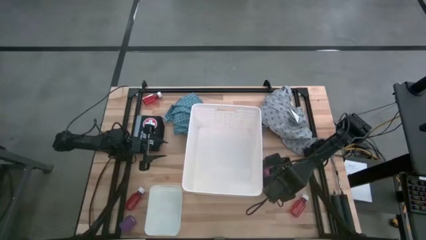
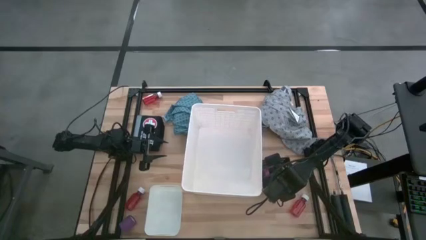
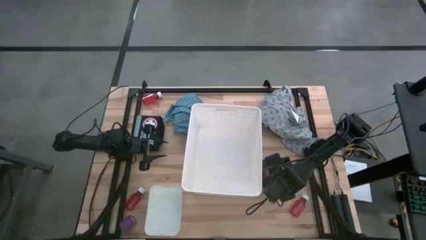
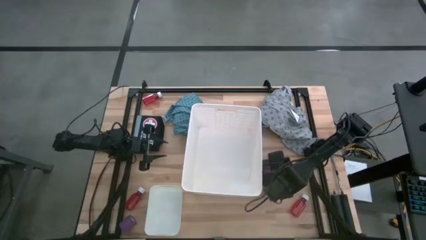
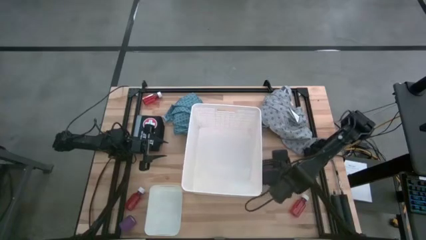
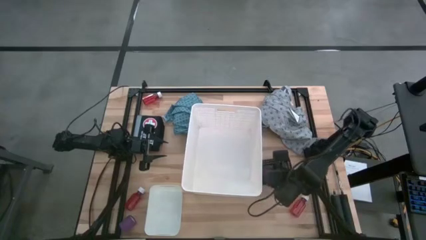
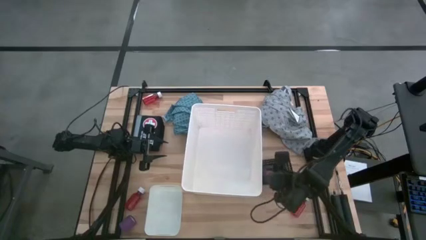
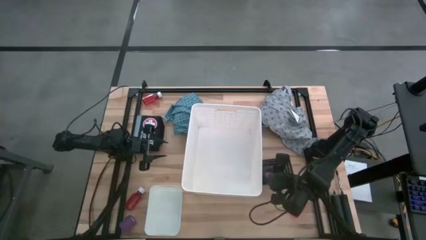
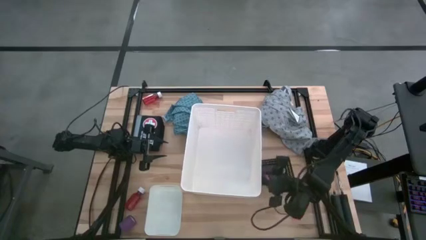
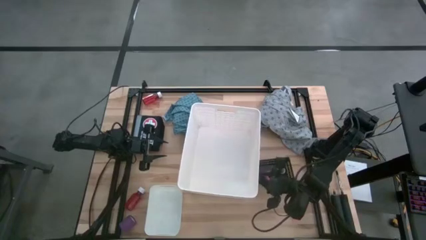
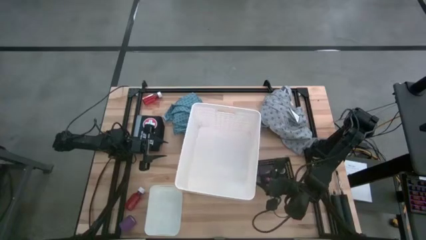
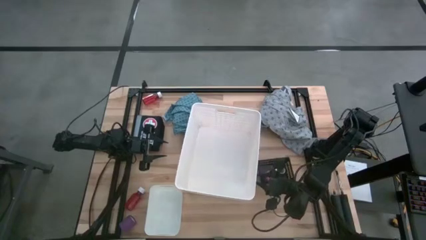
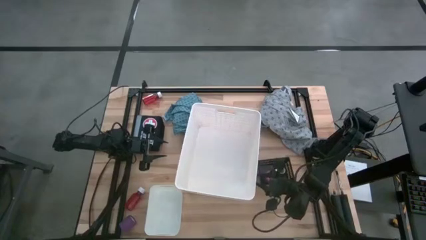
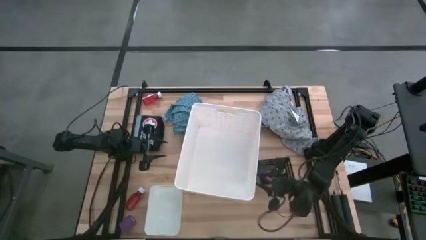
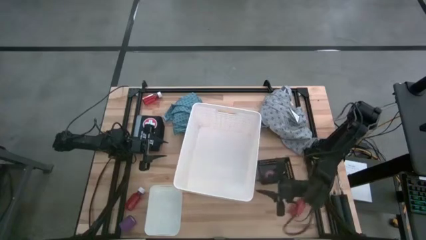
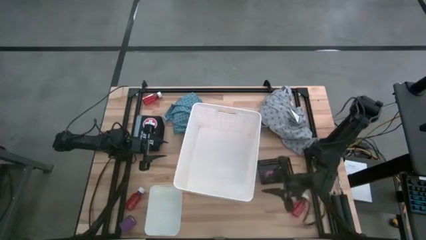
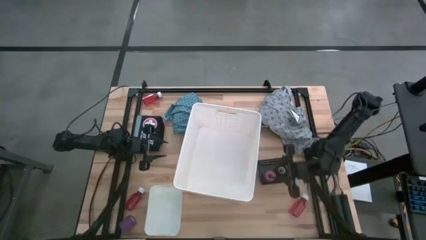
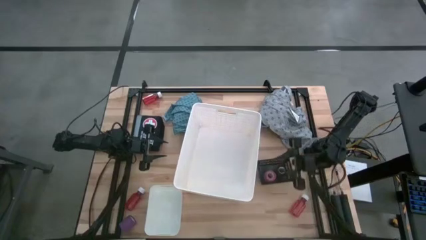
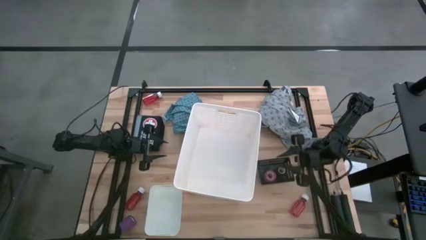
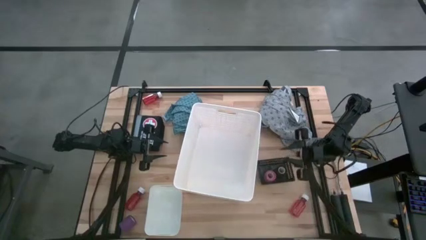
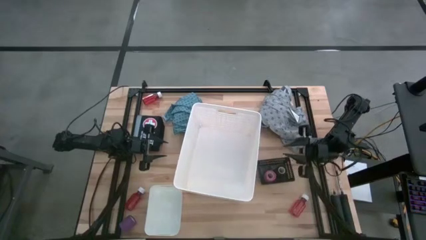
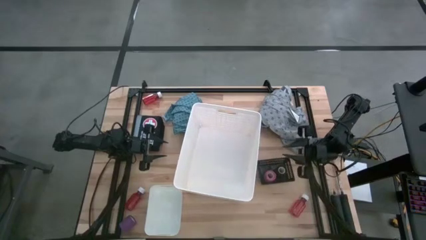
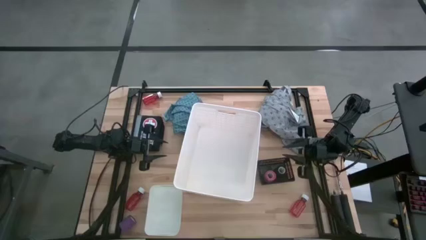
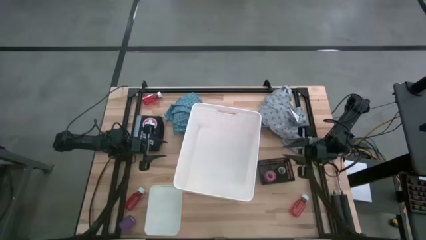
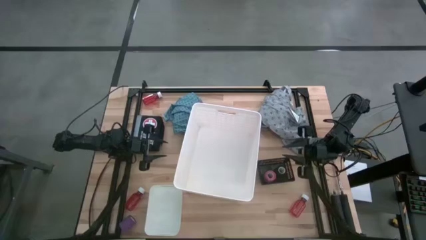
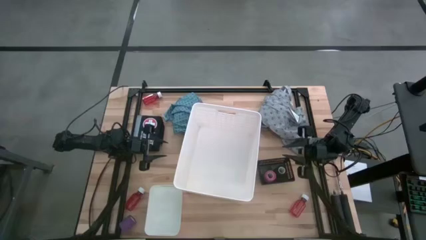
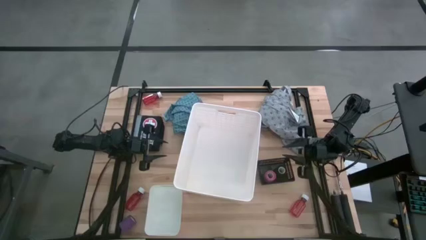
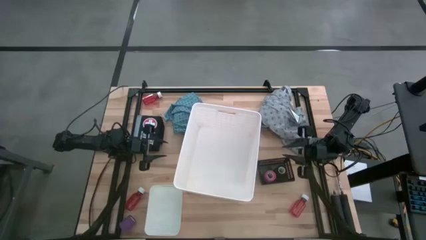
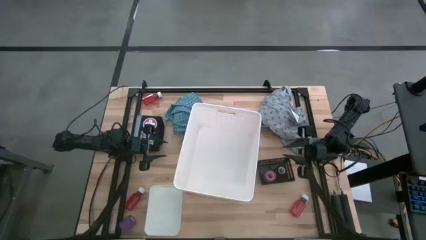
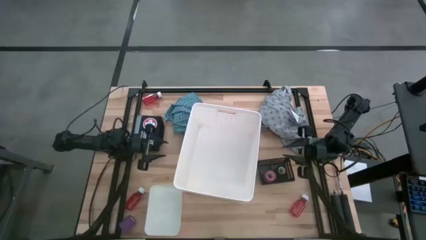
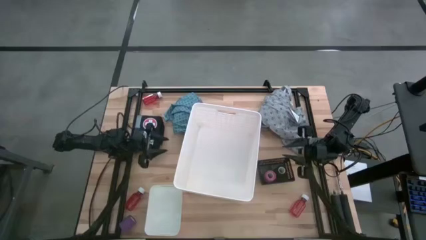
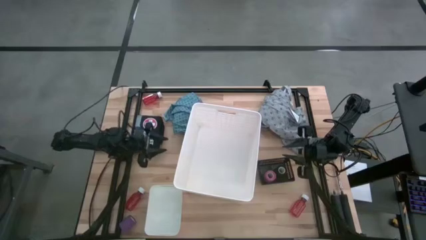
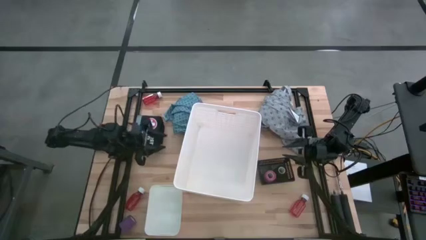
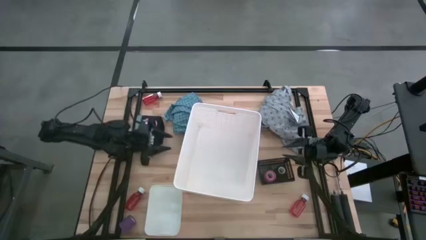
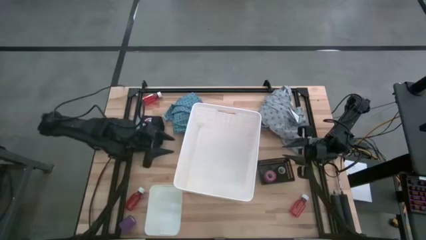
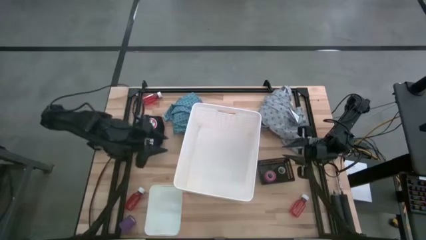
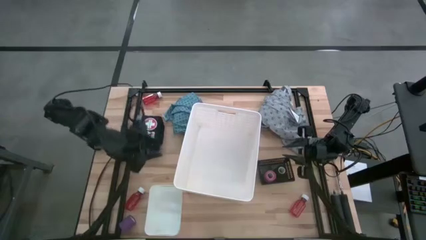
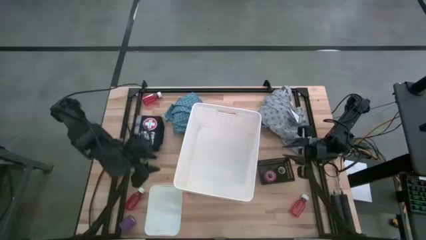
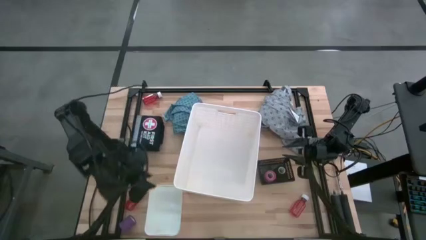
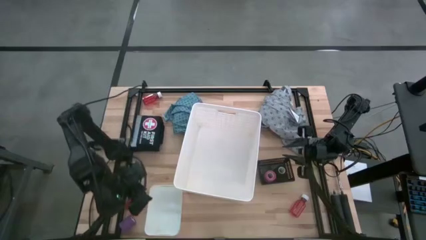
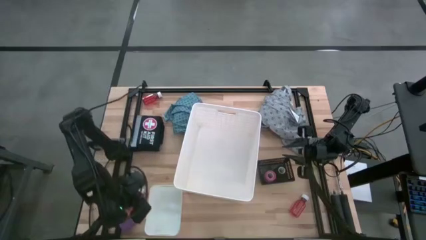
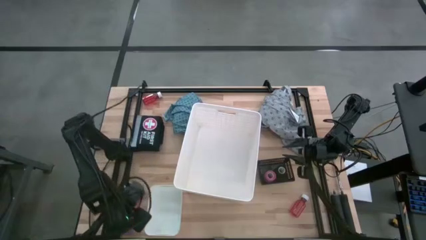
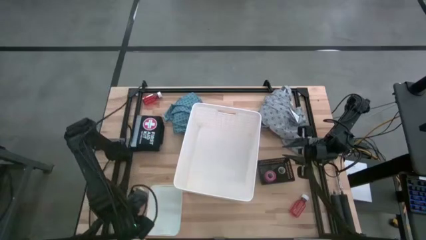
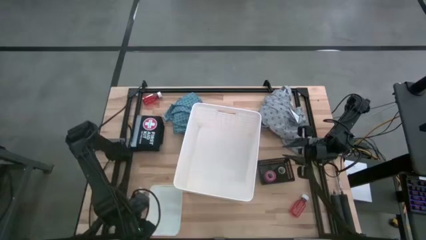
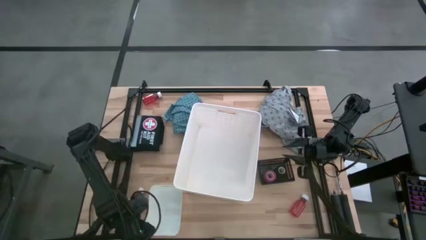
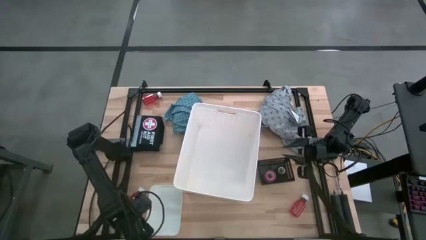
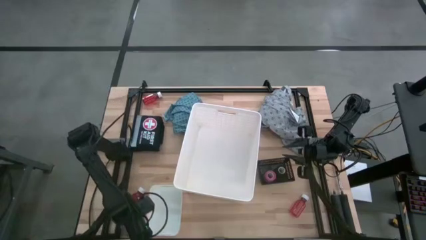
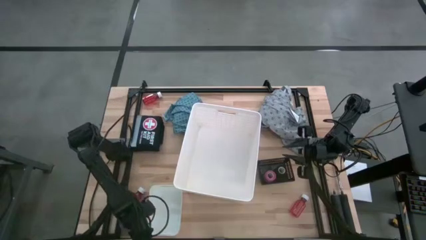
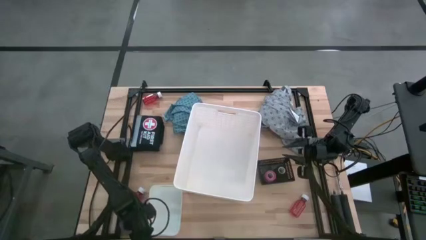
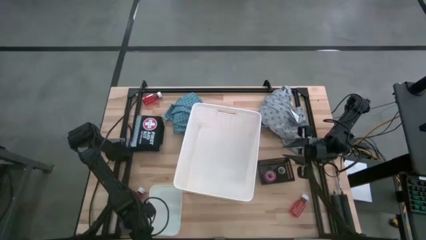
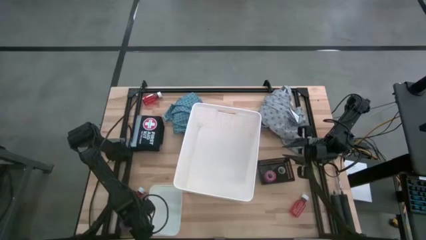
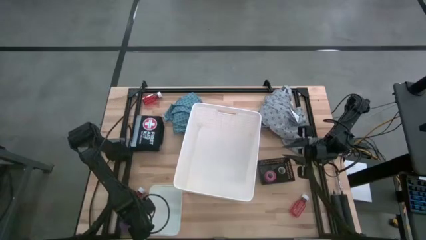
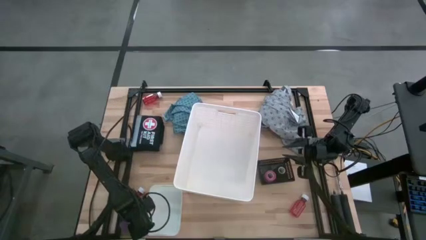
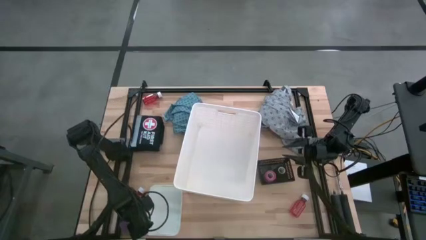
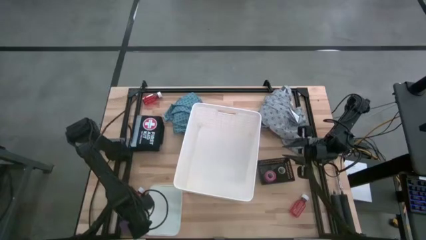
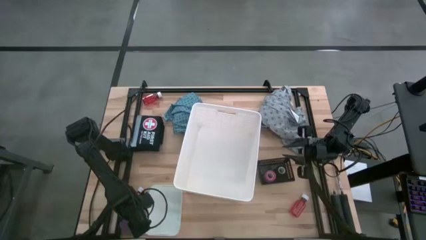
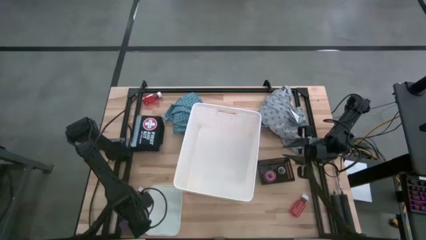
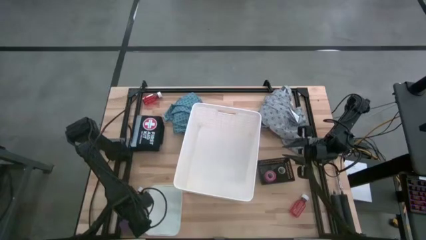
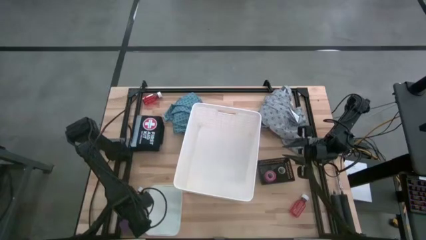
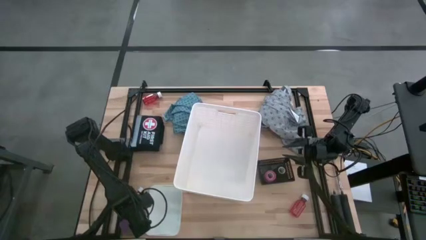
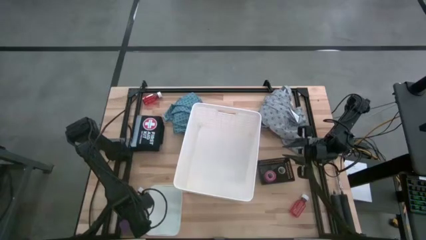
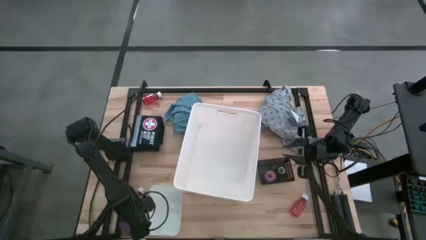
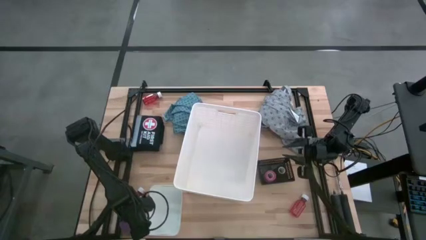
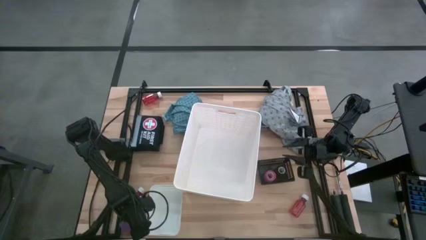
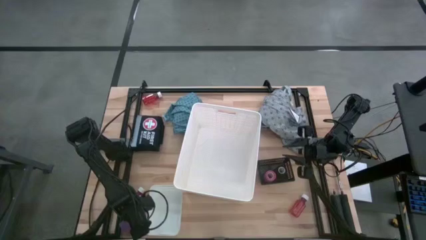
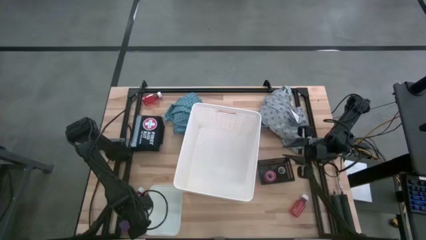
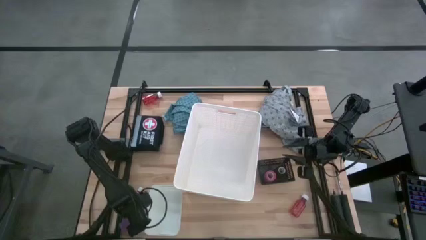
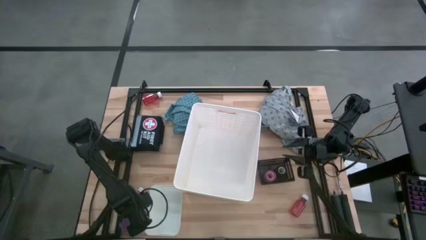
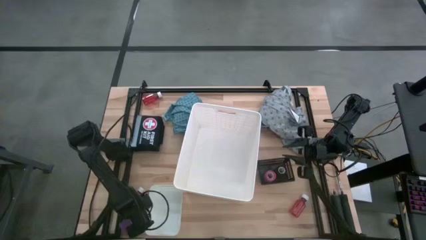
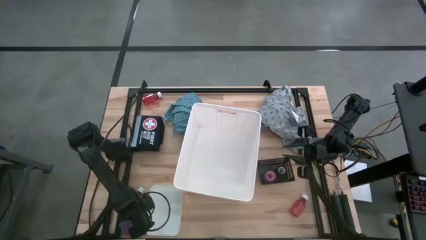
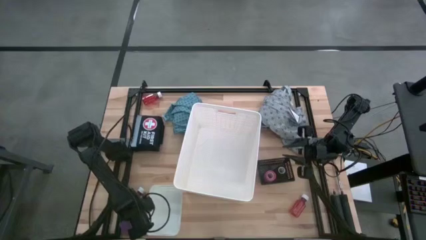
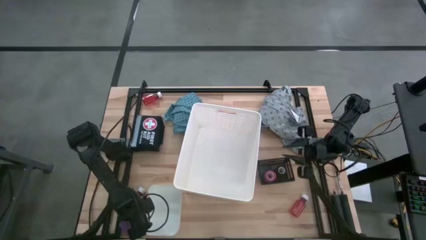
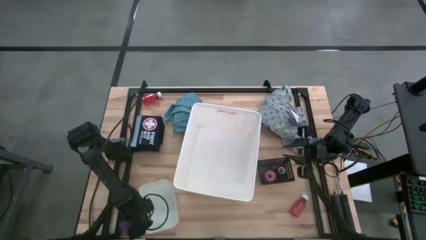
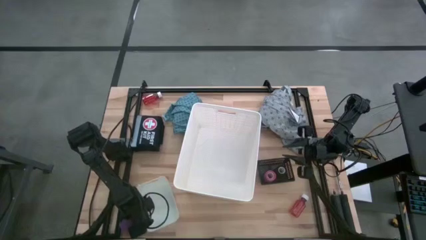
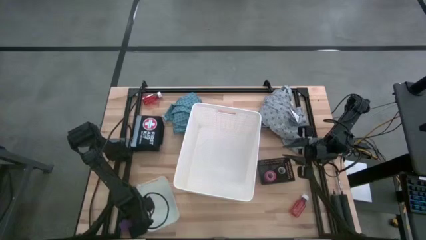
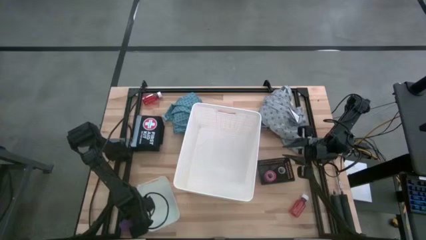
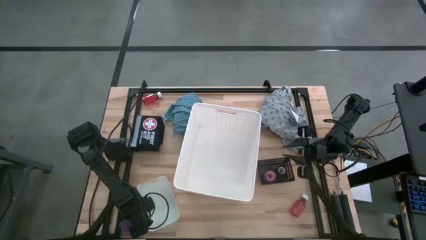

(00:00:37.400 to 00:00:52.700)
Task: Pick & place medical supplies in basket/bin
Put the violet bandage into the black bin
